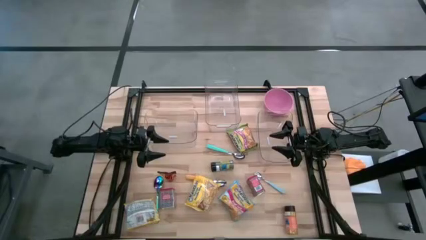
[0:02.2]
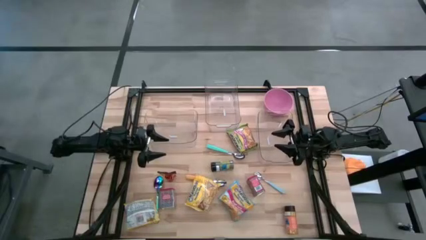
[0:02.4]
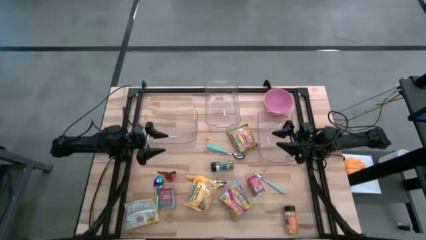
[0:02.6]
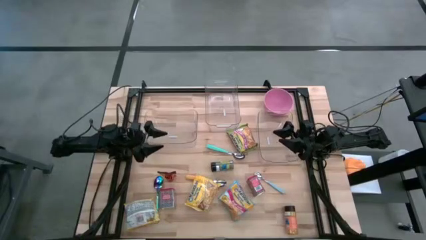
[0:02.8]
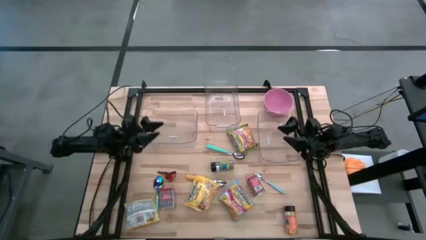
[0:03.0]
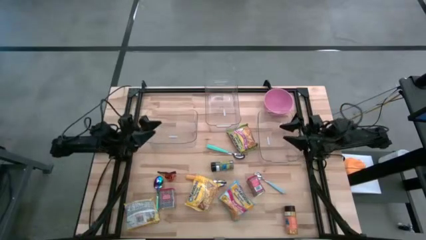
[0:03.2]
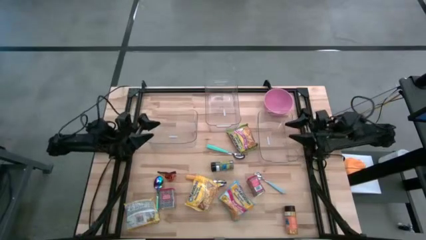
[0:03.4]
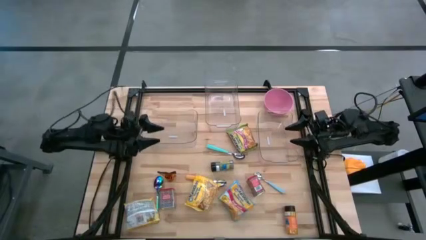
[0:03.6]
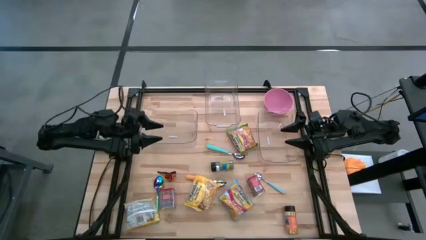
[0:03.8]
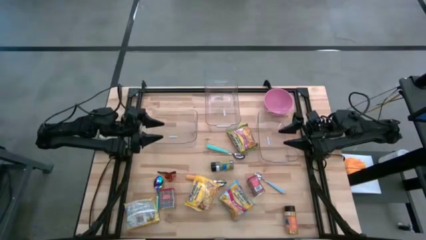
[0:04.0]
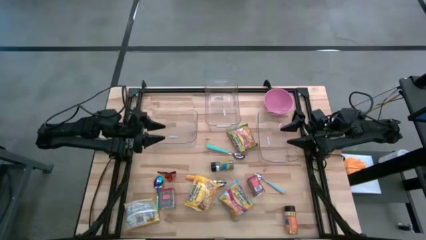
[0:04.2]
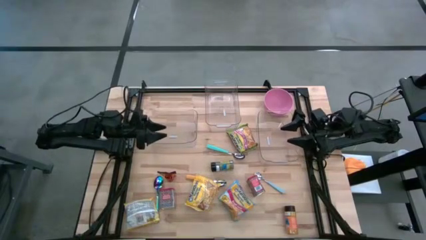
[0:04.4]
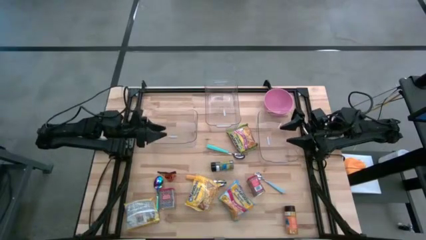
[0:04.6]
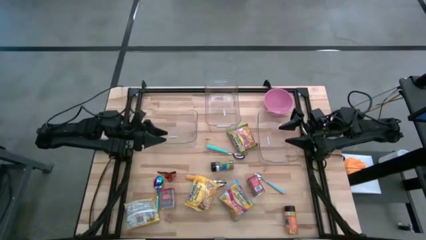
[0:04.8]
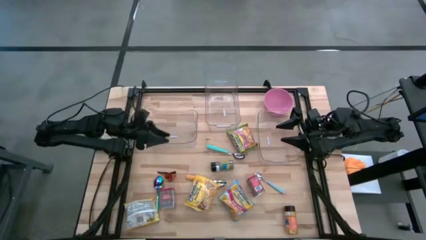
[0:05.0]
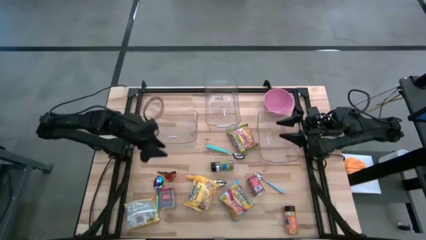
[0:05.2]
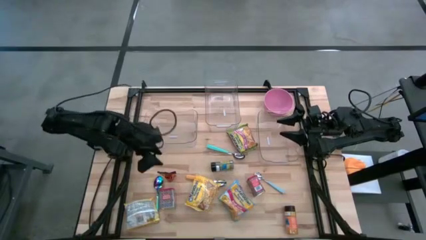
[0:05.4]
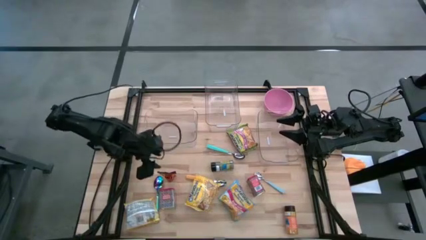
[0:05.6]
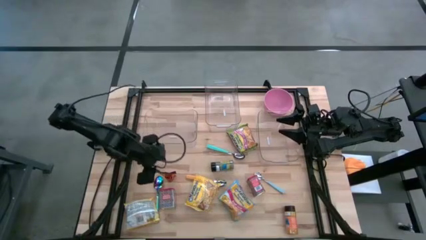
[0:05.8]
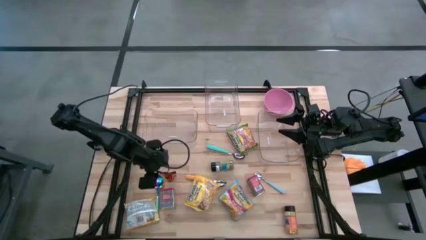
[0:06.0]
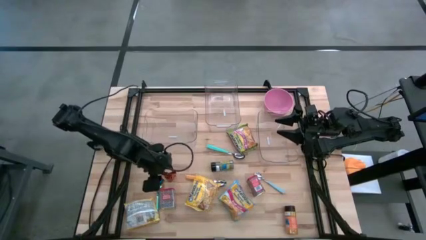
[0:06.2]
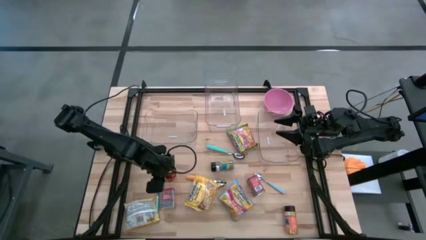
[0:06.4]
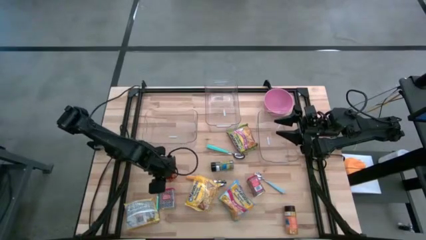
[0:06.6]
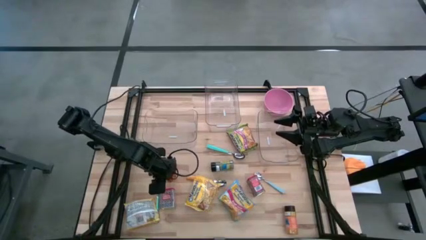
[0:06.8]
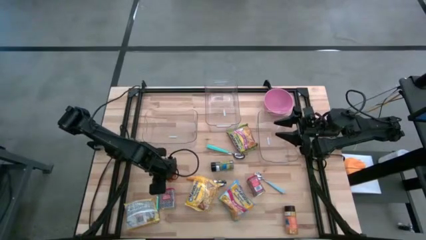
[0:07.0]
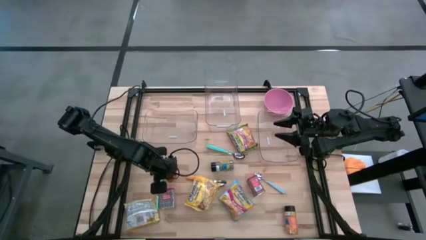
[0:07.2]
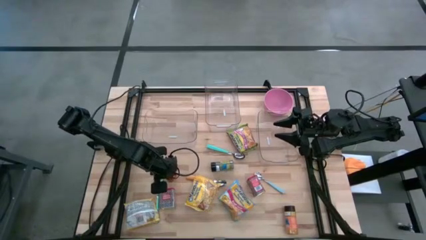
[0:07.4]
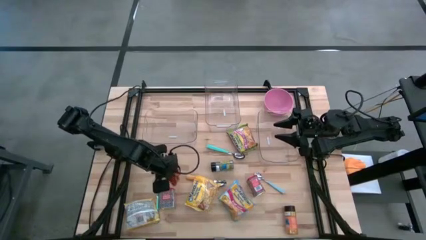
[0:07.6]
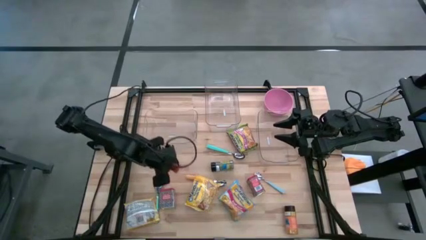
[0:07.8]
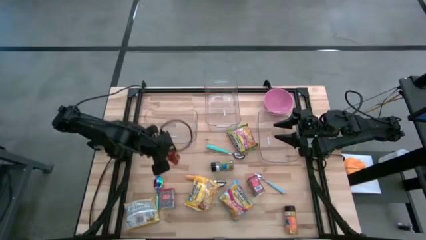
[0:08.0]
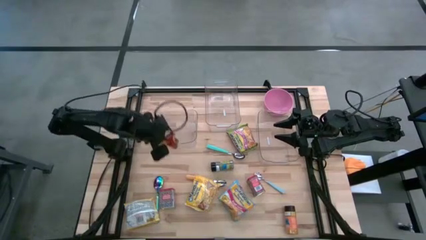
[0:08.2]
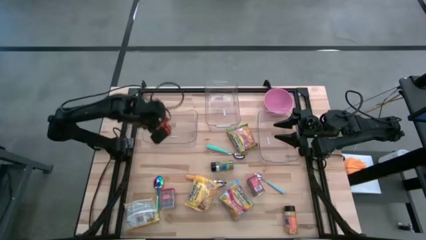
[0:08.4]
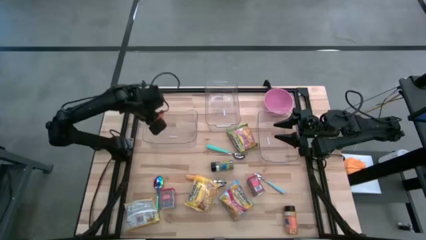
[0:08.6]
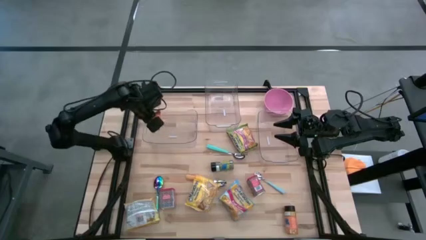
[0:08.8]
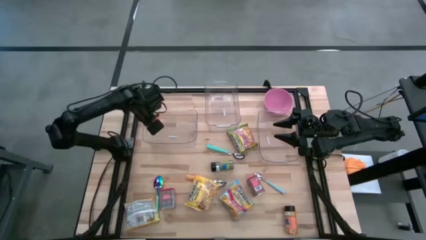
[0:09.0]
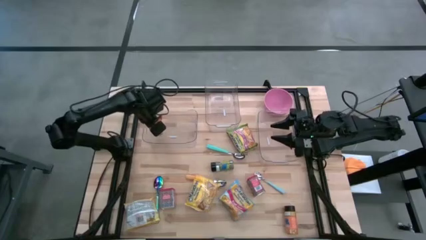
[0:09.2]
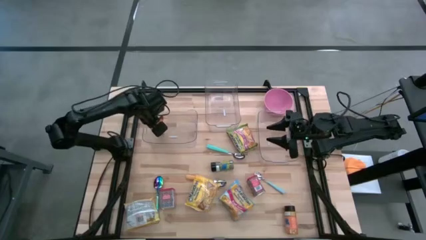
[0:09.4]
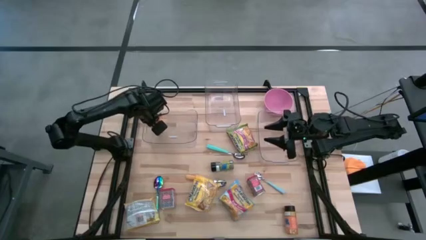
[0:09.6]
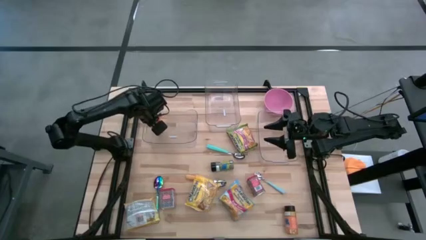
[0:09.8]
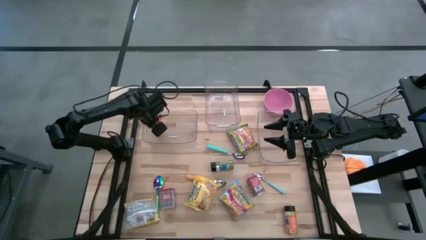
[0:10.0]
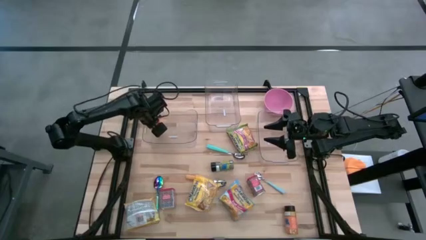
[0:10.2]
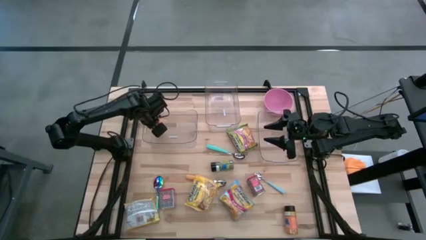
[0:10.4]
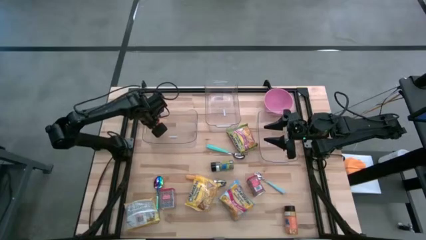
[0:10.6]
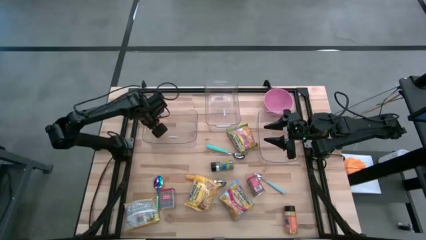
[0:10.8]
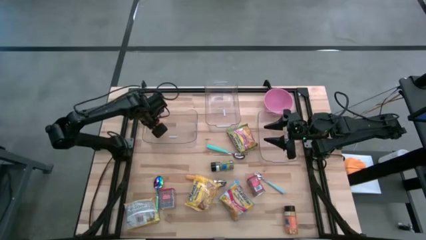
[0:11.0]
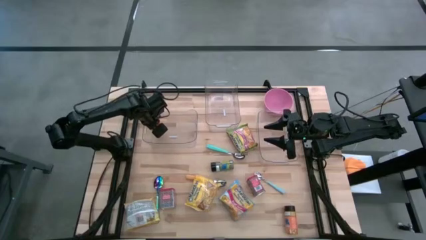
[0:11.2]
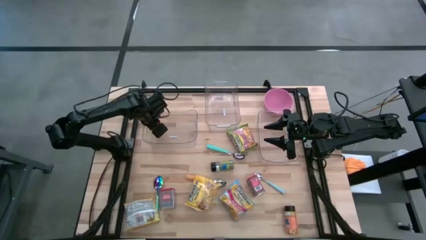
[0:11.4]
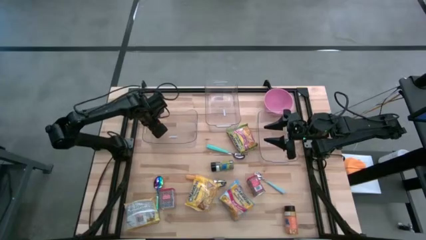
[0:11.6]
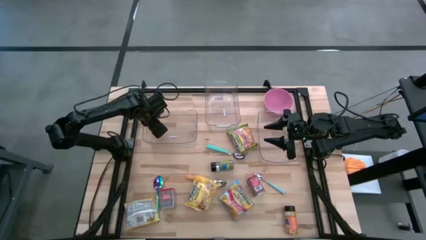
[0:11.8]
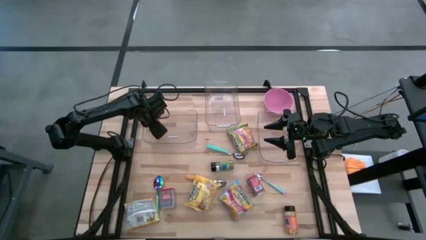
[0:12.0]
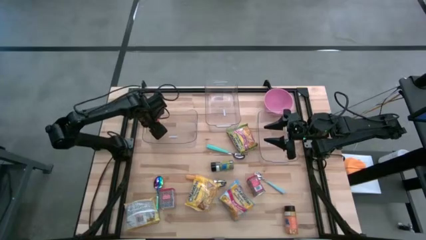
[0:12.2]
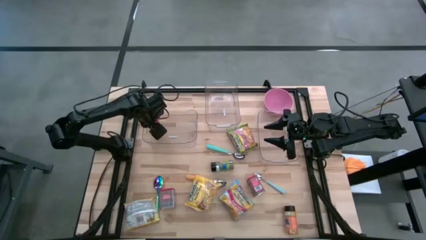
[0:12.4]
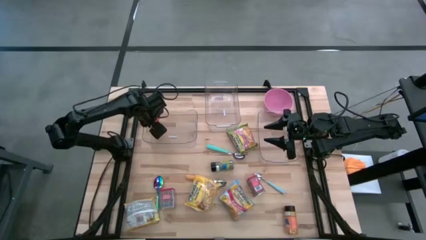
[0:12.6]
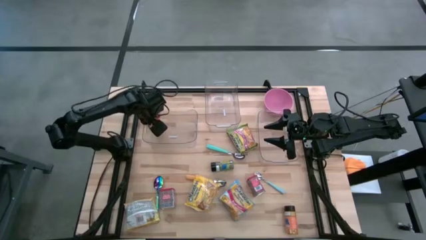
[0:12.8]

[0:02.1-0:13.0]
Put the orange seasoning bag into the left transparent bin
